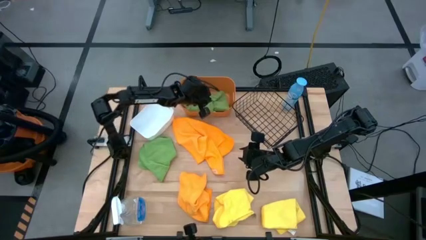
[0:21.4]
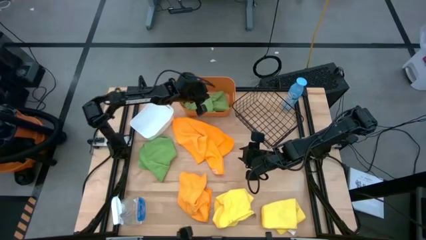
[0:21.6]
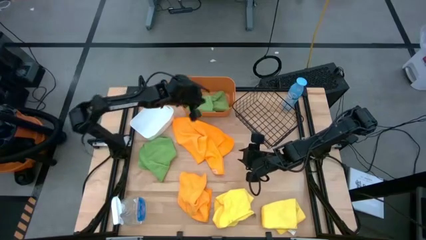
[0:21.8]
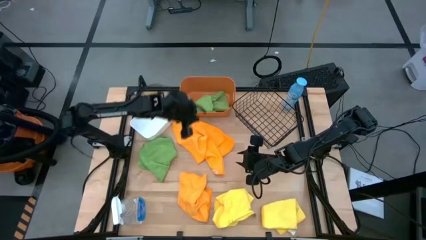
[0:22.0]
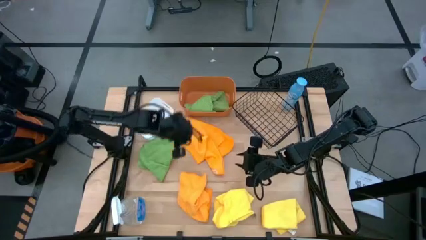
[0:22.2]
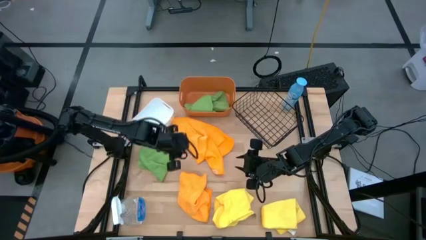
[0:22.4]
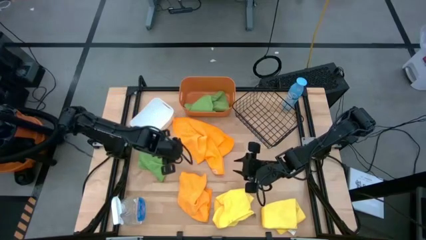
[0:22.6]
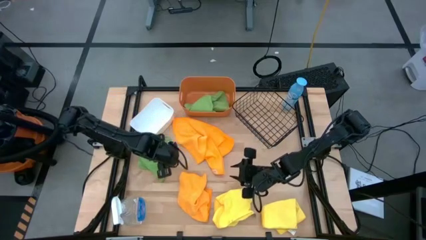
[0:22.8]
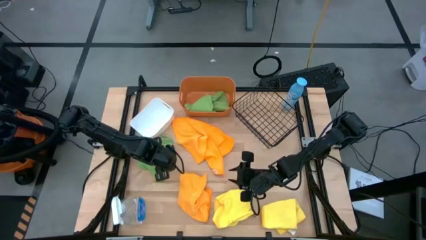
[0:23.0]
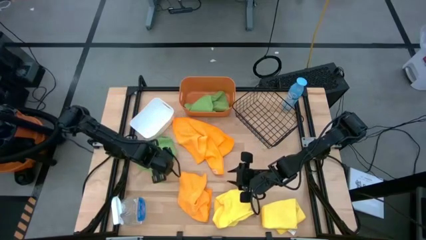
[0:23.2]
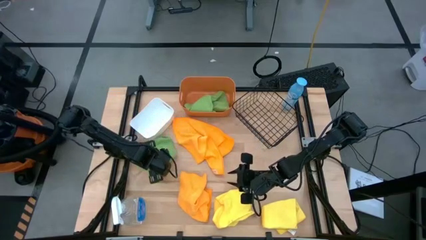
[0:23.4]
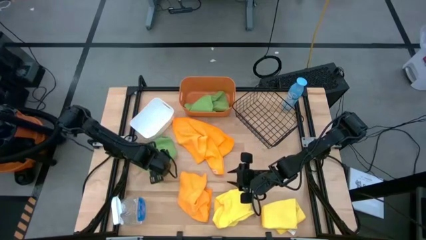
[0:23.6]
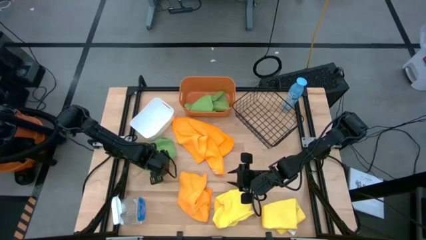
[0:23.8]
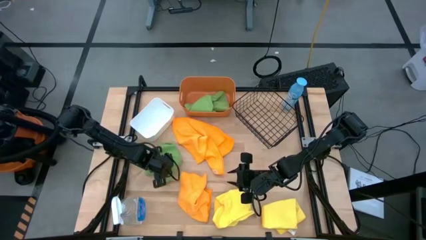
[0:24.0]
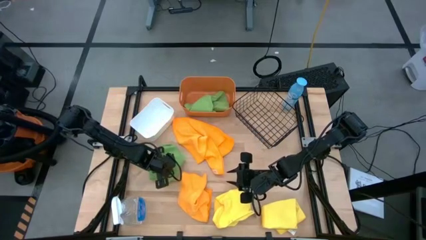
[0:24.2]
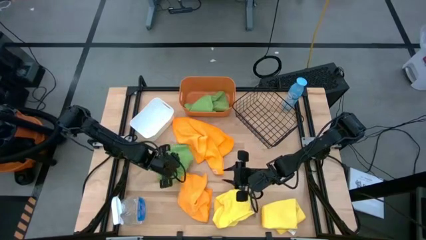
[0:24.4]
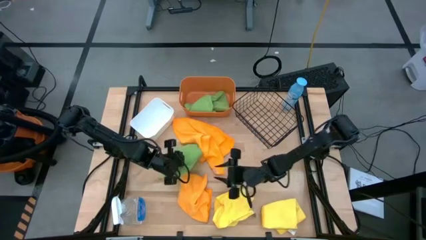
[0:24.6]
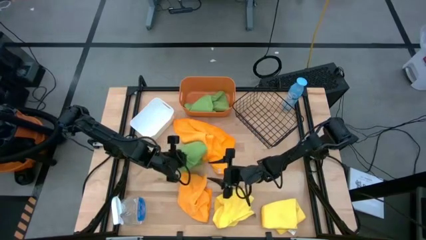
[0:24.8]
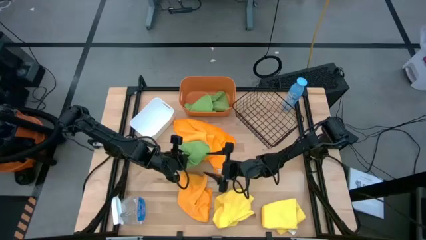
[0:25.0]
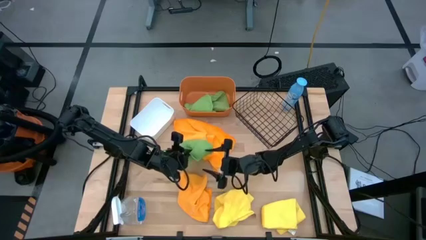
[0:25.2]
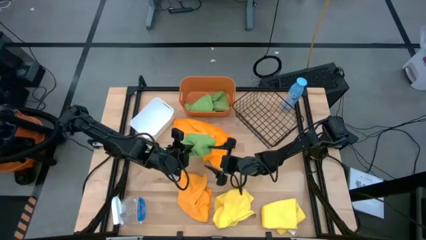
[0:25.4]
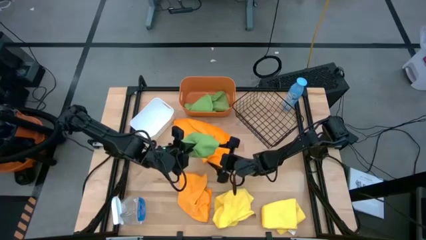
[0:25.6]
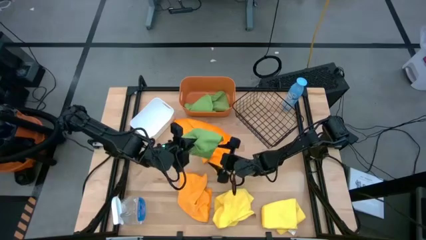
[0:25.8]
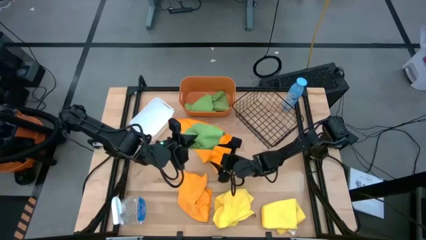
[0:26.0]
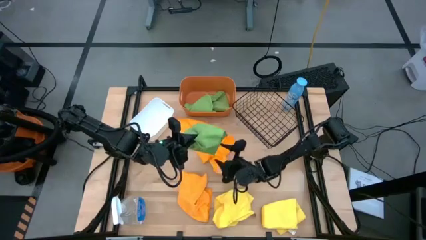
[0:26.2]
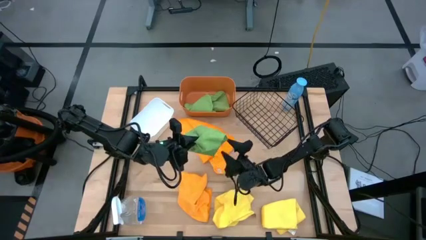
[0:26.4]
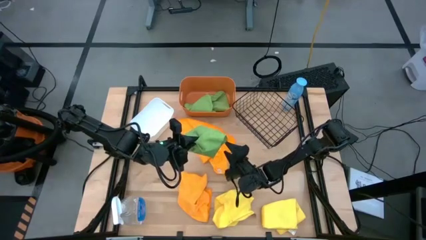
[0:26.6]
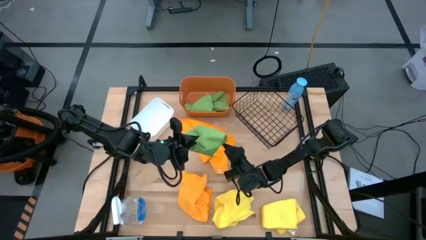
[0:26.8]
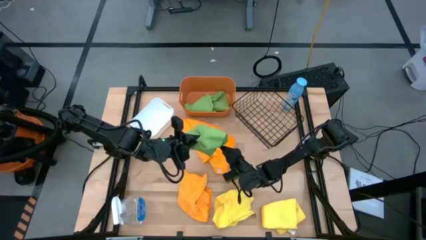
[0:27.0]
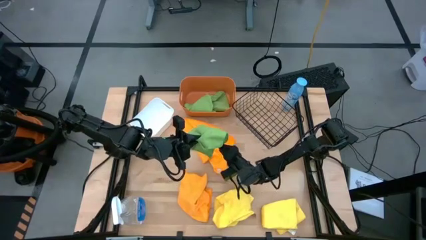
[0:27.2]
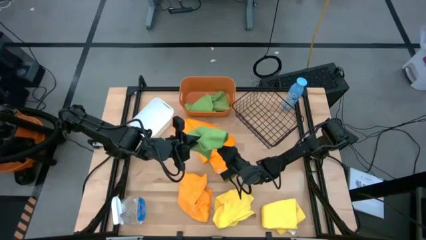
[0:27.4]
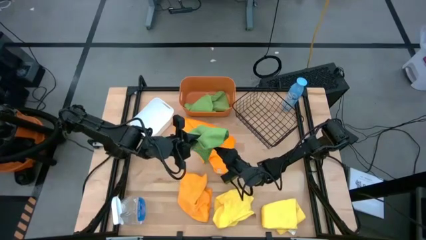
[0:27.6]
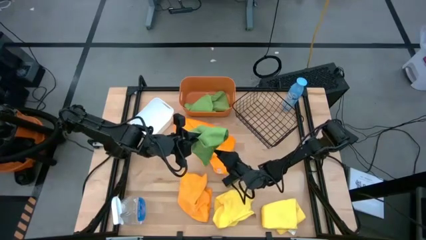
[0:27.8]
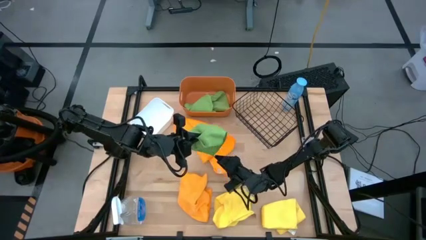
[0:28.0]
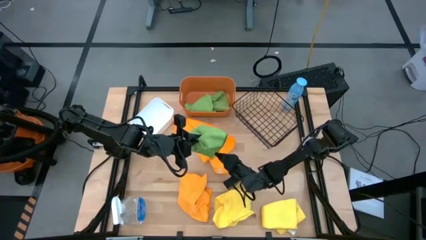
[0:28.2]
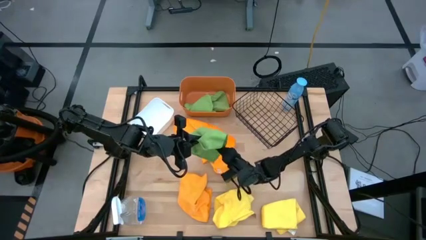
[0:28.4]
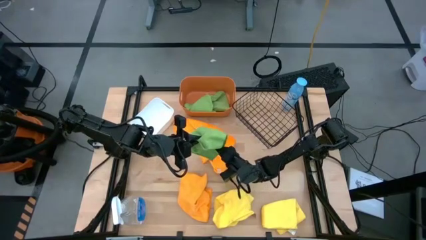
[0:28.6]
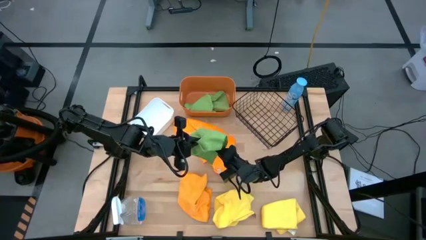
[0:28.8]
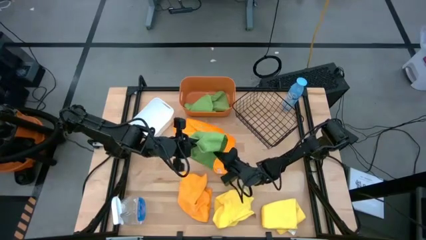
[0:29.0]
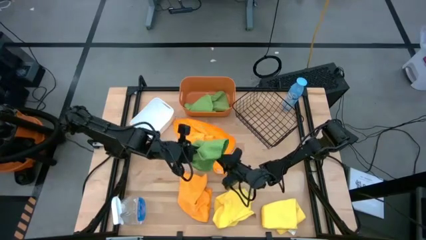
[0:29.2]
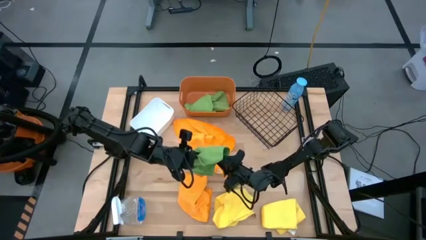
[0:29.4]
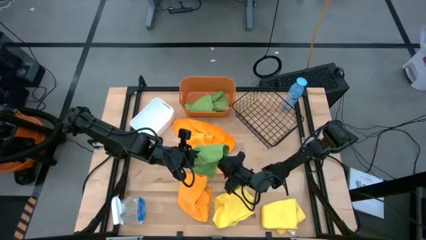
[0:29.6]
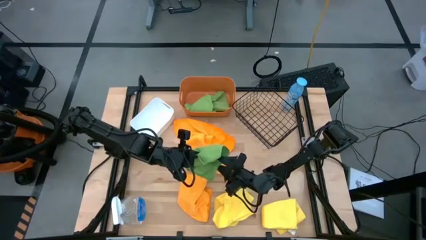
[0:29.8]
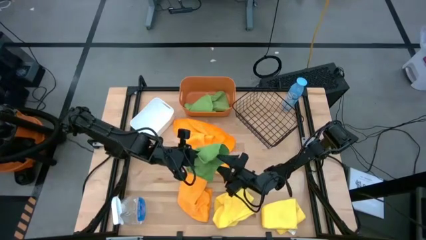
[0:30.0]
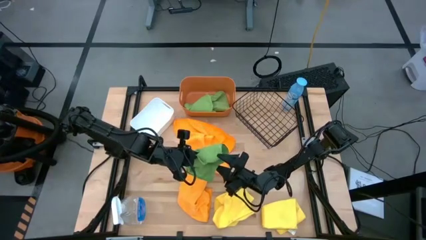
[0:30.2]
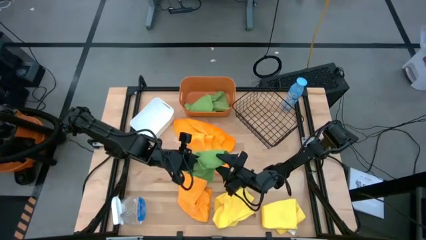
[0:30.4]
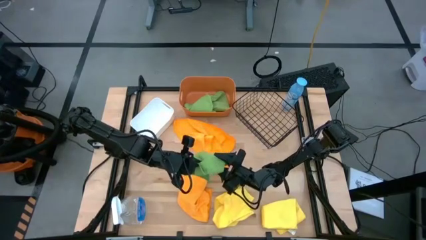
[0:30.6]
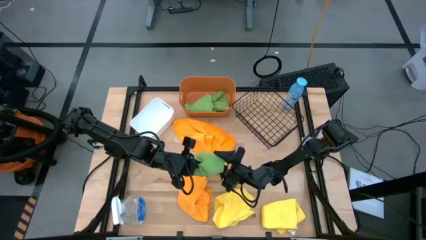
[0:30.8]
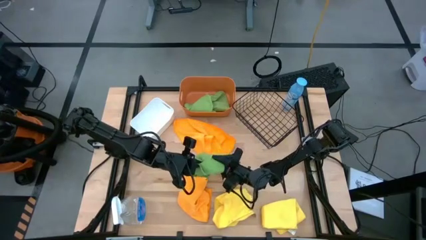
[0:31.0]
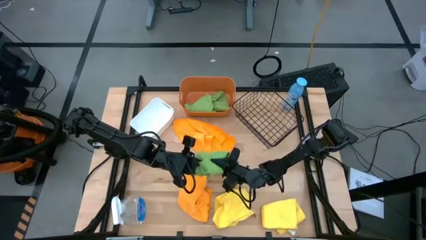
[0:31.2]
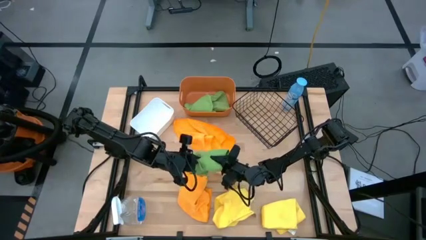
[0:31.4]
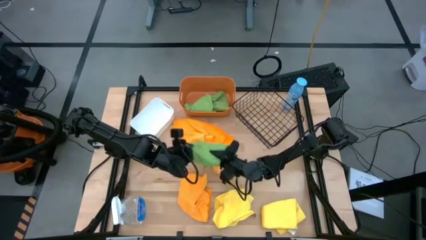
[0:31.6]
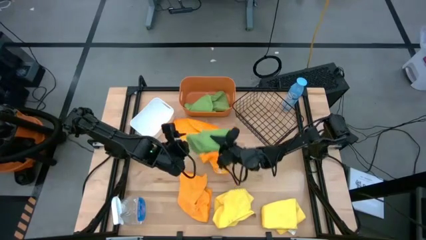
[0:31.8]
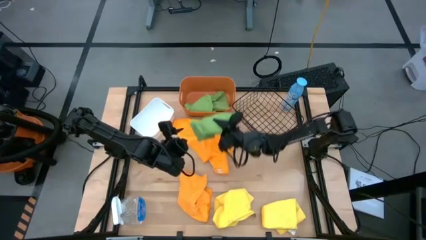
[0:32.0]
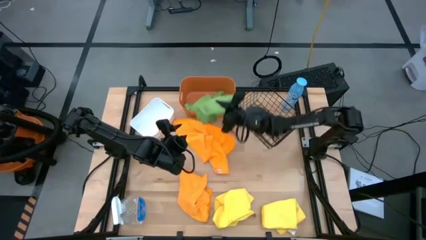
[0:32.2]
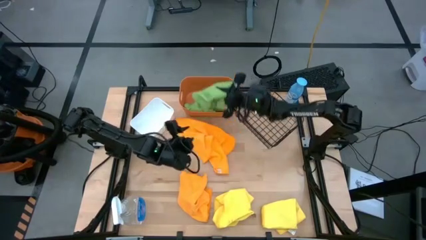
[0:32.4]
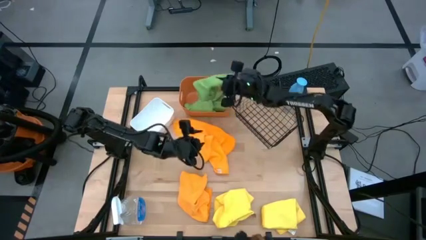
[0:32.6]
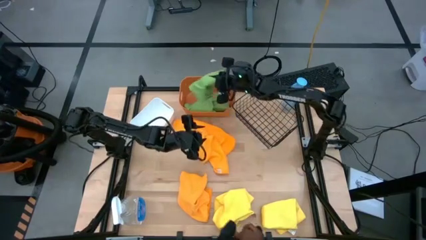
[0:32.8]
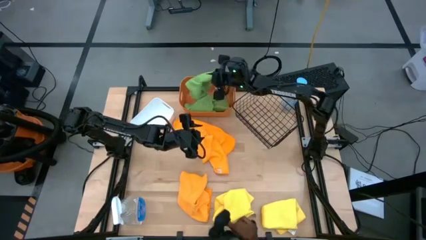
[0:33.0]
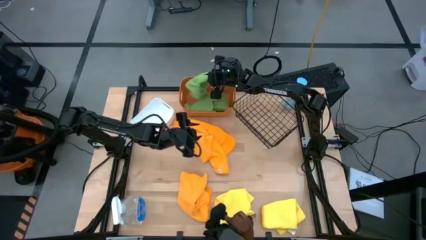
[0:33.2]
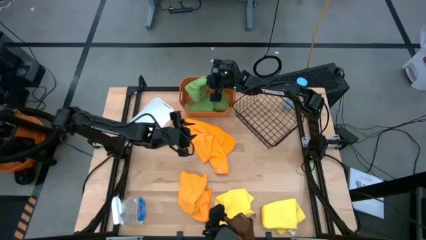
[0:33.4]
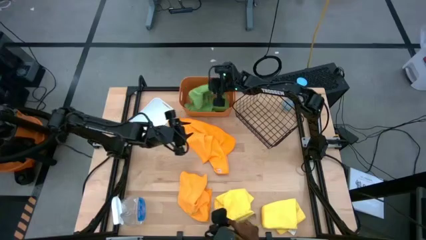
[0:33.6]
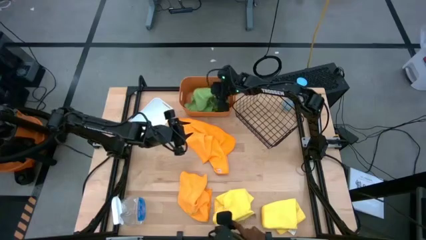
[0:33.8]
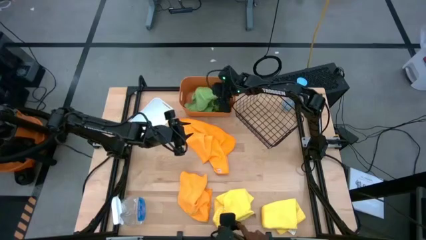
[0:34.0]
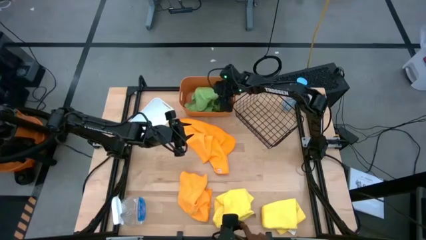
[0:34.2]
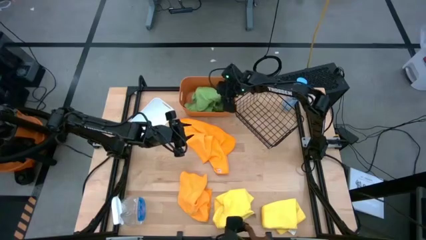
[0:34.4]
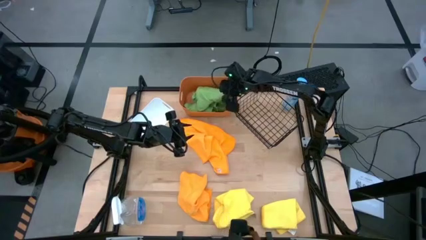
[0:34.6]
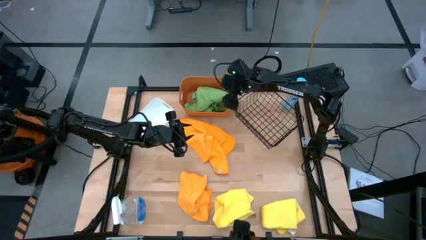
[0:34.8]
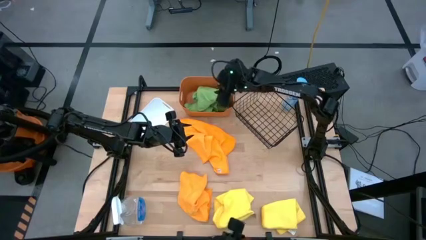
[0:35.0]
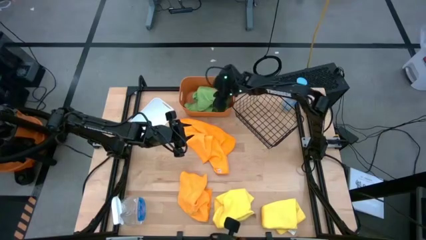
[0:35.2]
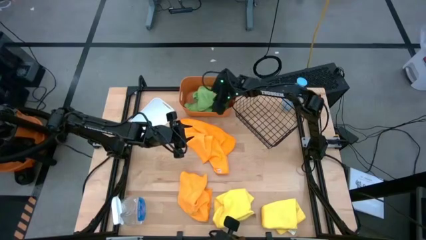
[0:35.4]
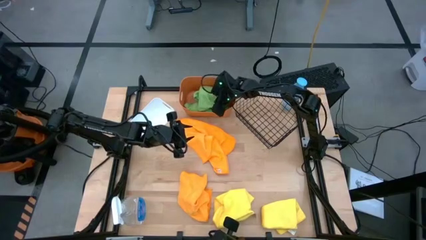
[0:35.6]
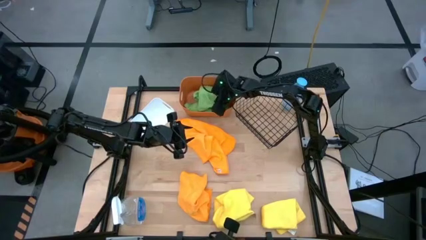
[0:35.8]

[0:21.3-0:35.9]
Task: Sort microfiber towel by color & place in baskets
Put the green towel into the orange bin
